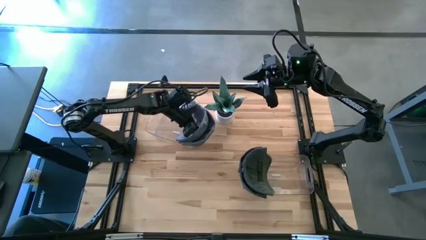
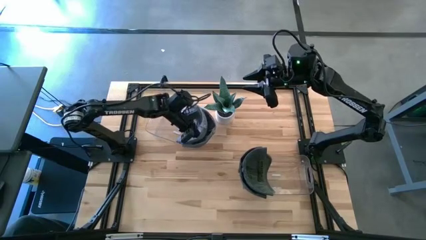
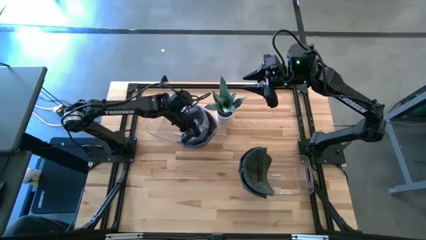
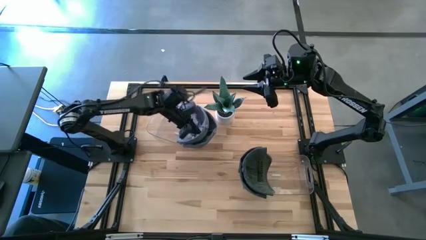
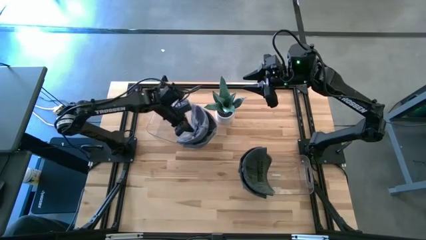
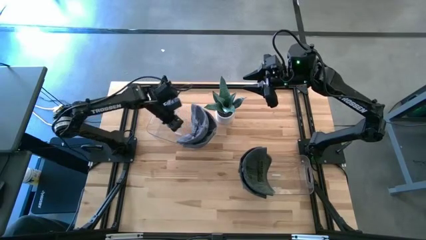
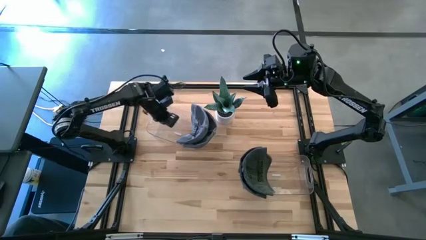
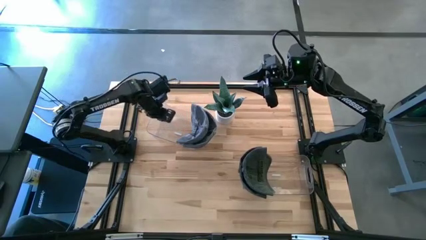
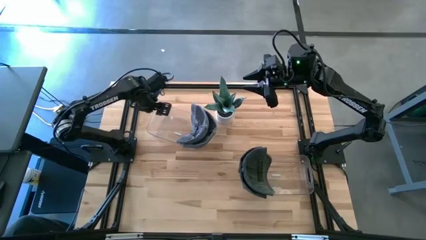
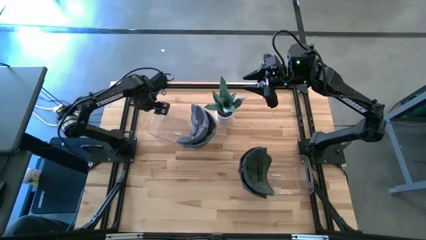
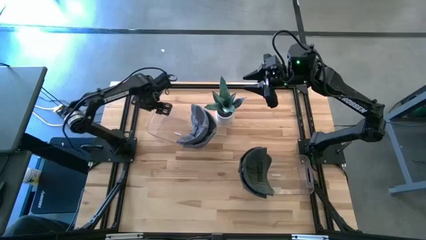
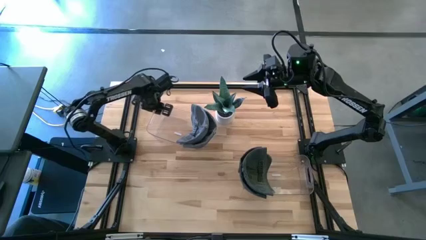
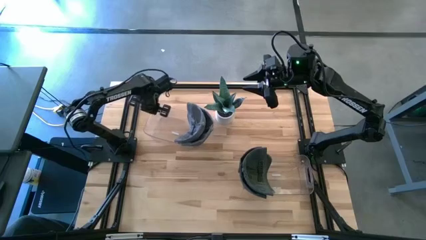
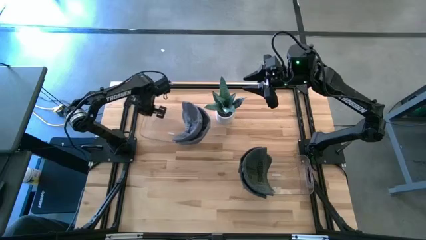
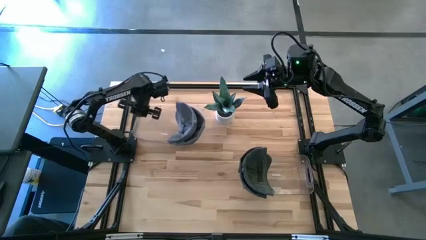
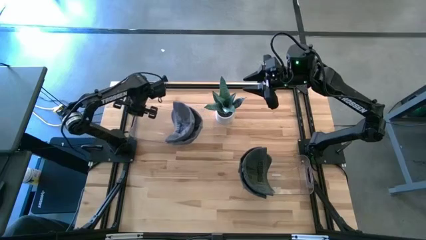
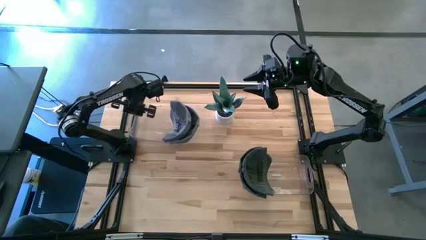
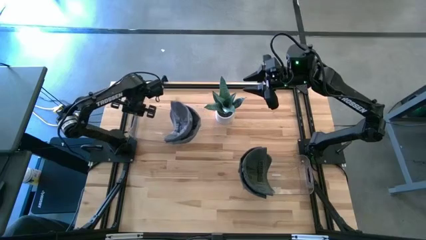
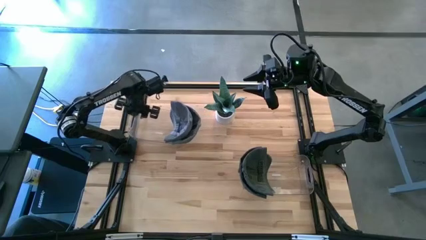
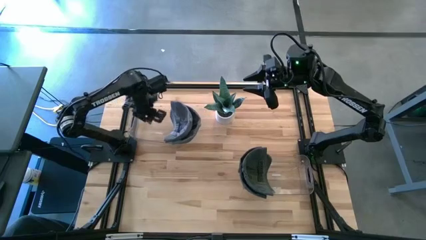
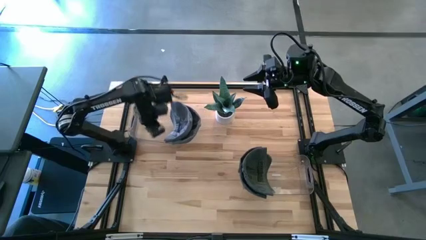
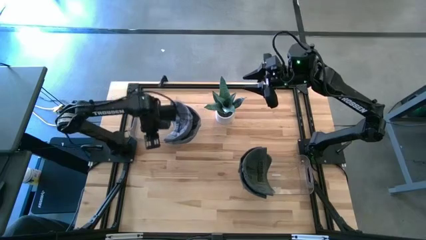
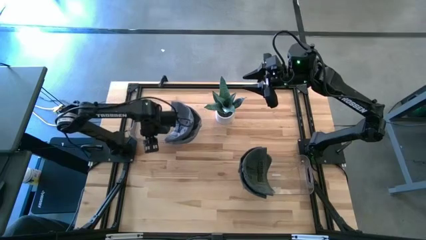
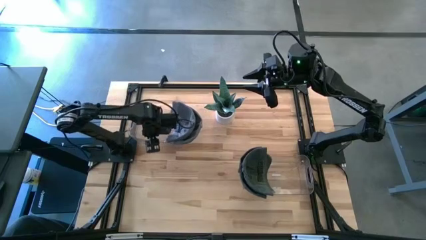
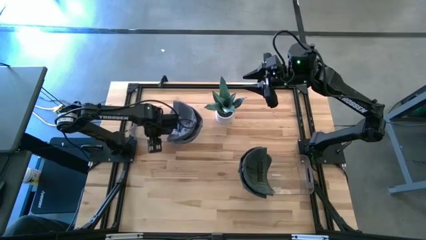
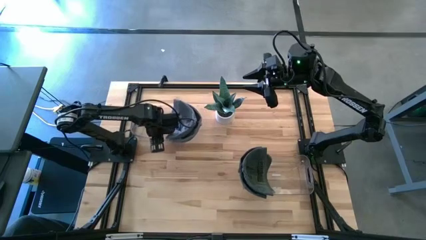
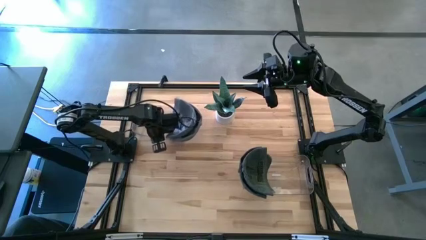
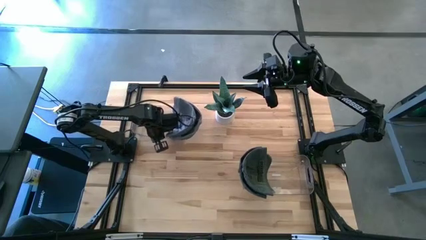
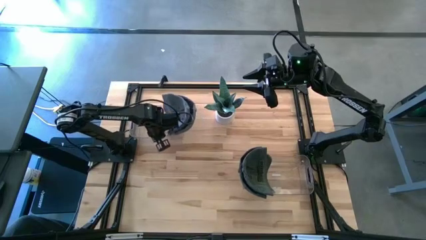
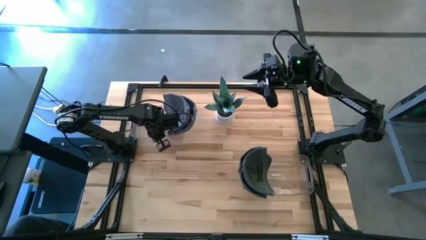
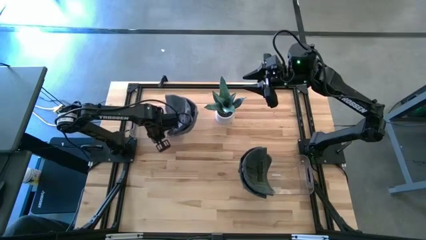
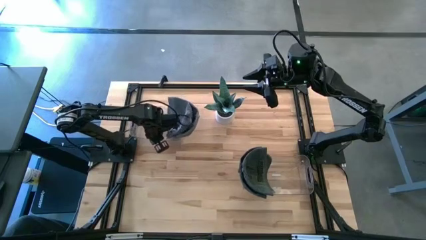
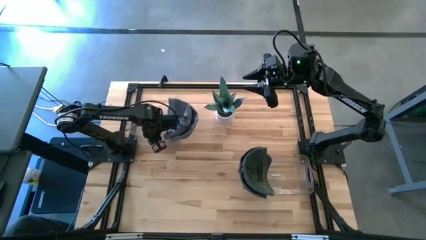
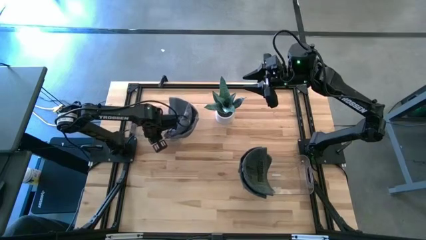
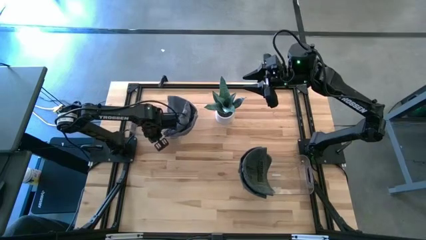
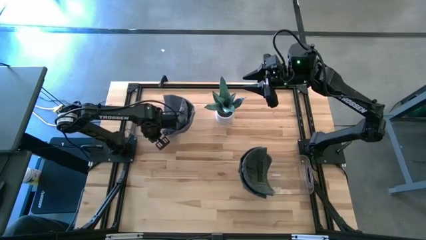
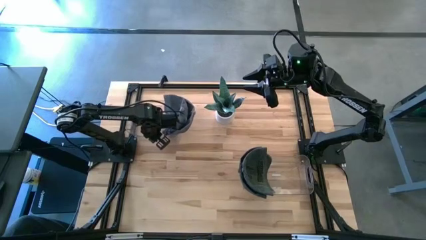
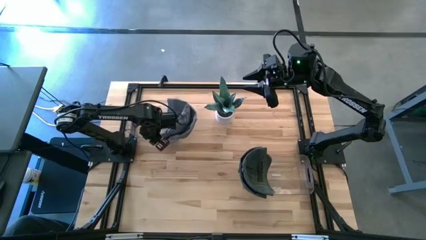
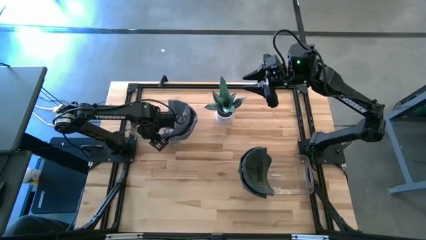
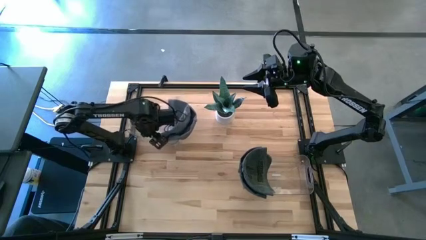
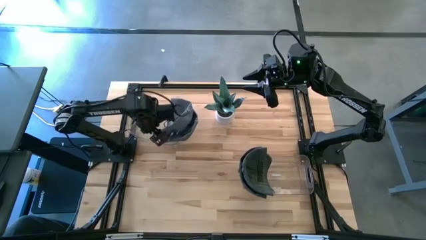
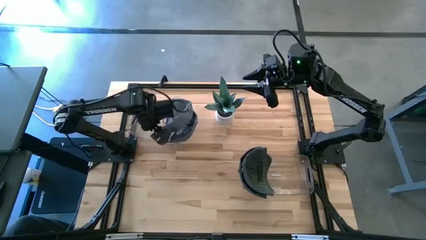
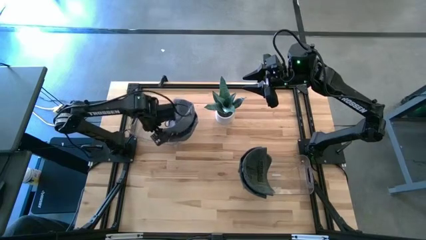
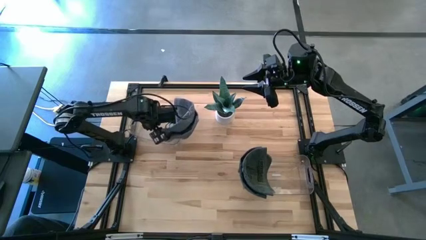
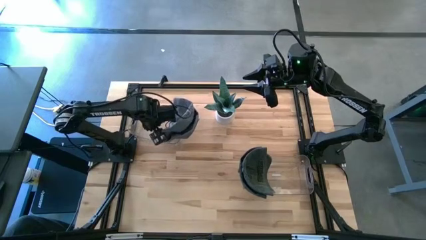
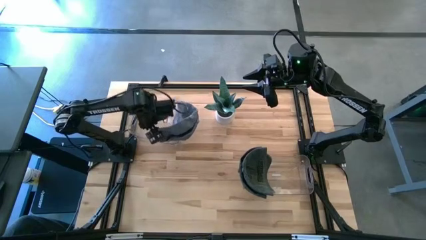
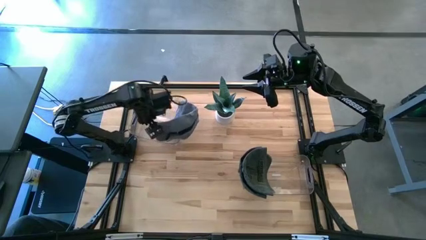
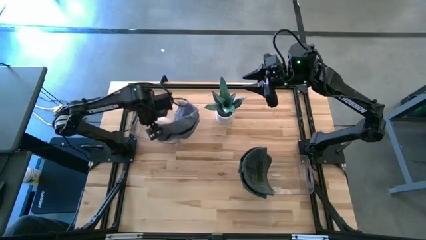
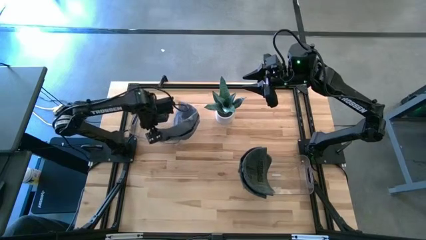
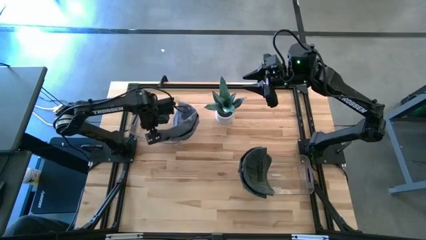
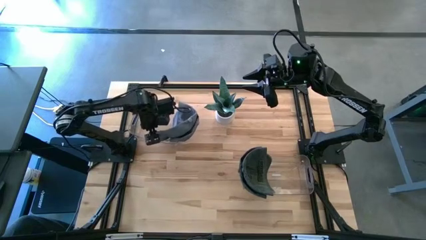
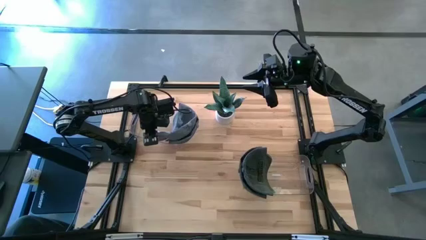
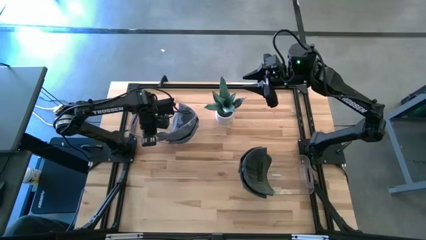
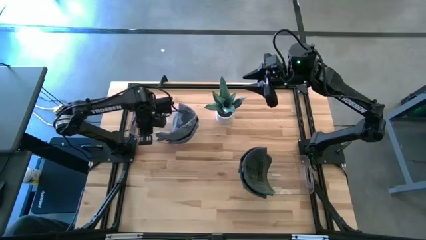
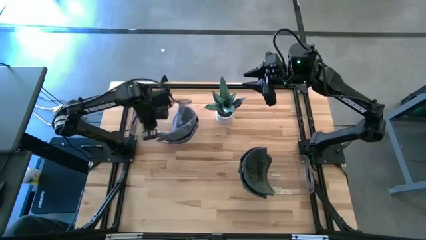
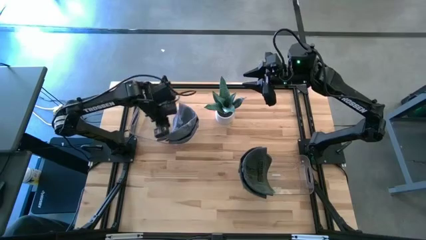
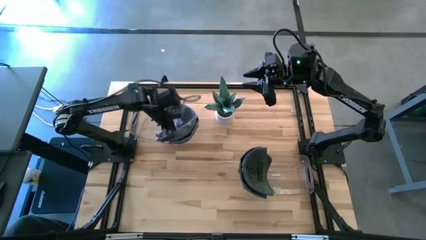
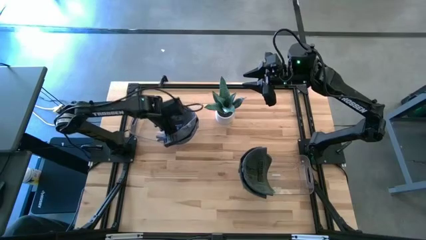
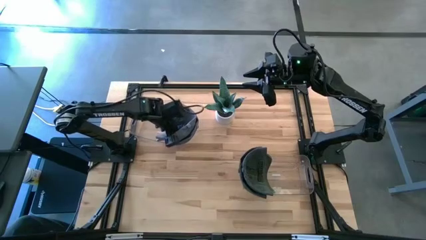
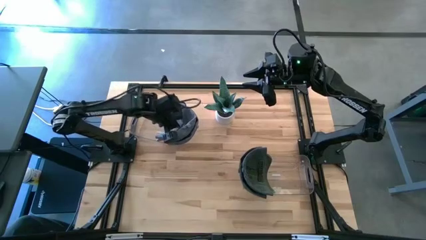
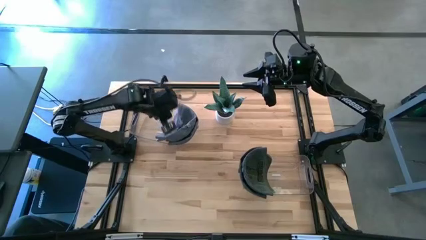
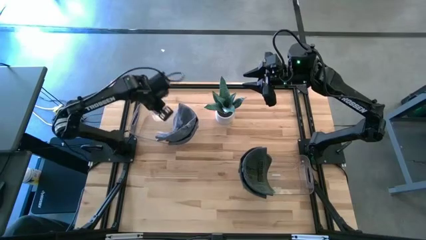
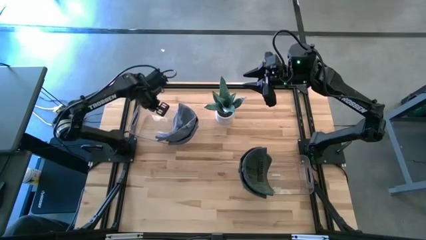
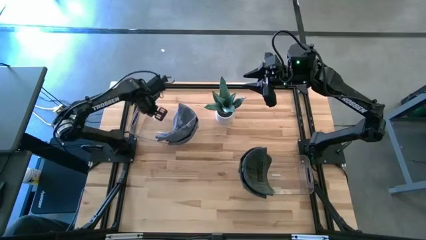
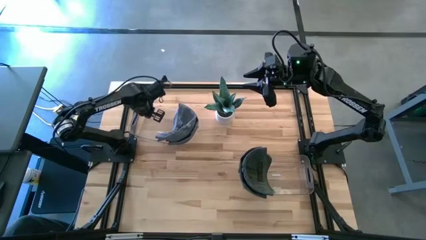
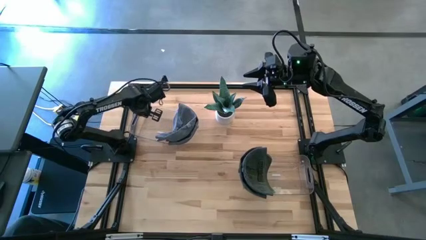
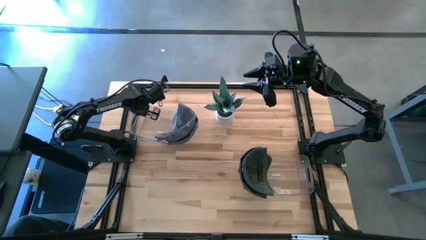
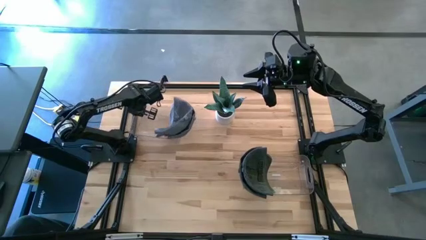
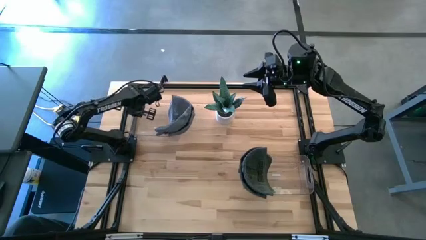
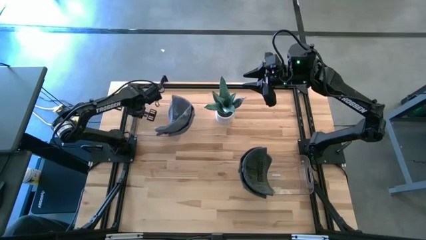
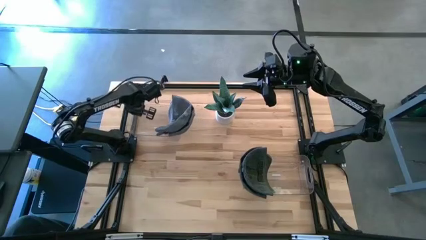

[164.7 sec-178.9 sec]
Task: Pick & Place hat
Put the gray cap into the left transparent bin
